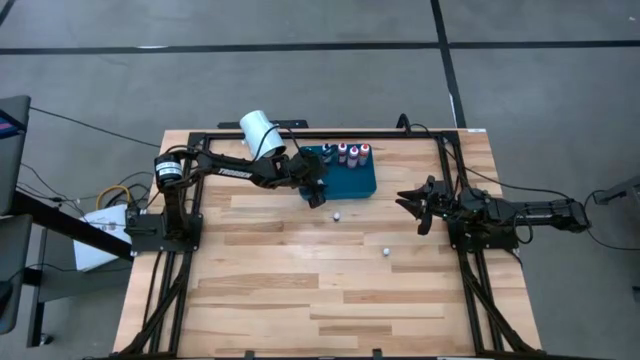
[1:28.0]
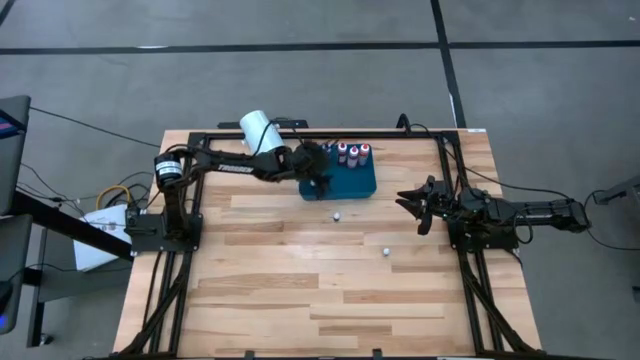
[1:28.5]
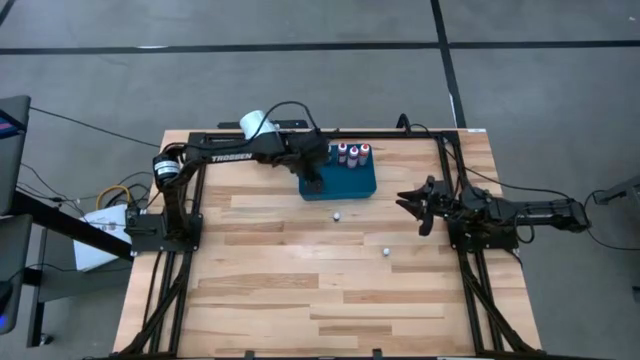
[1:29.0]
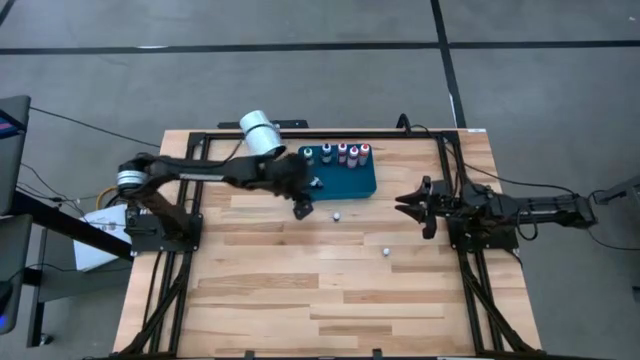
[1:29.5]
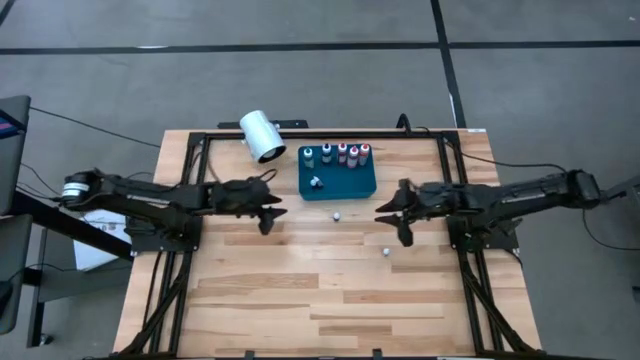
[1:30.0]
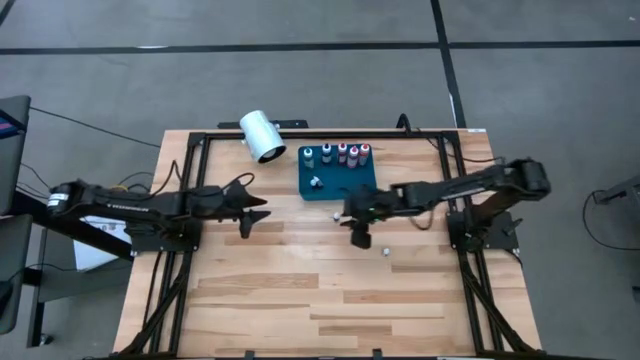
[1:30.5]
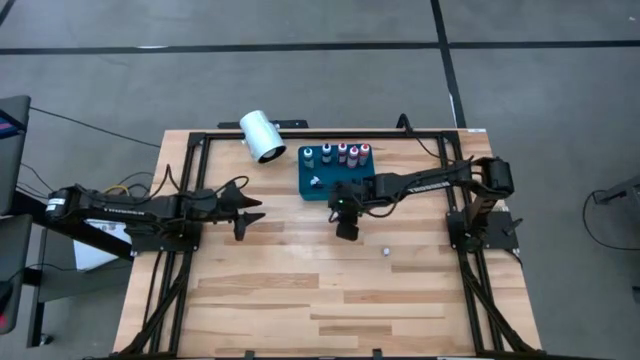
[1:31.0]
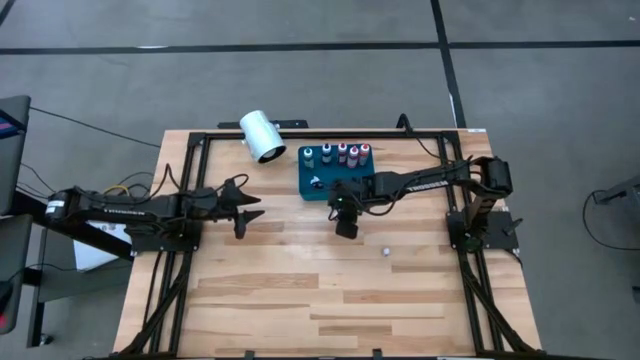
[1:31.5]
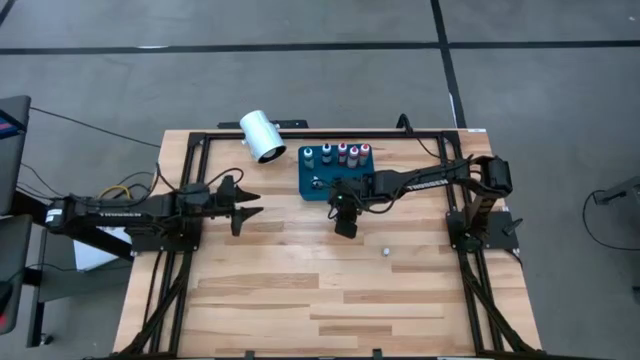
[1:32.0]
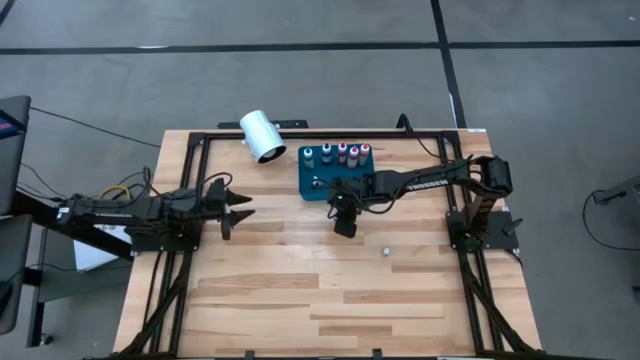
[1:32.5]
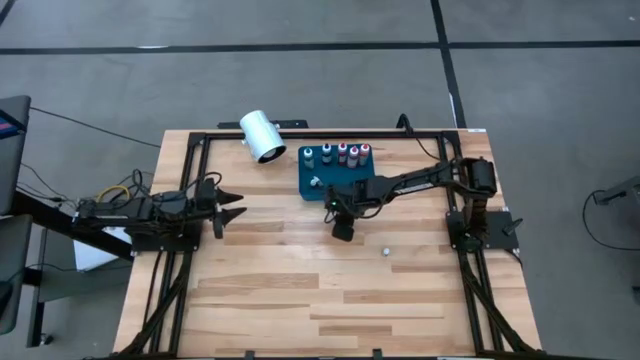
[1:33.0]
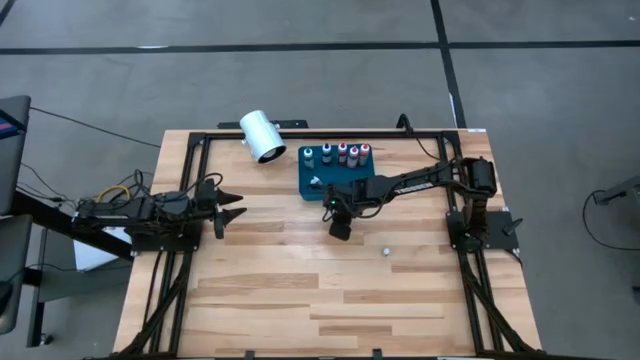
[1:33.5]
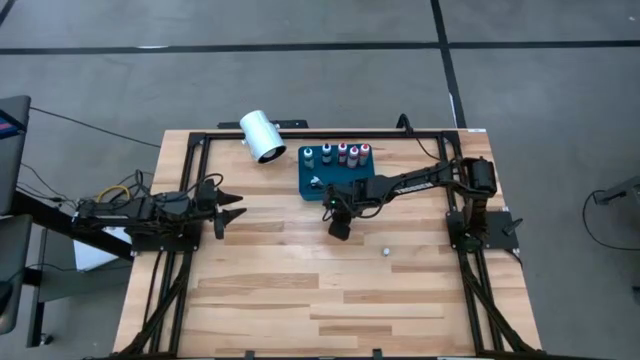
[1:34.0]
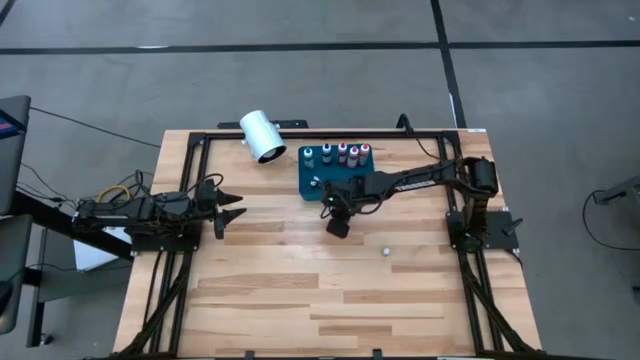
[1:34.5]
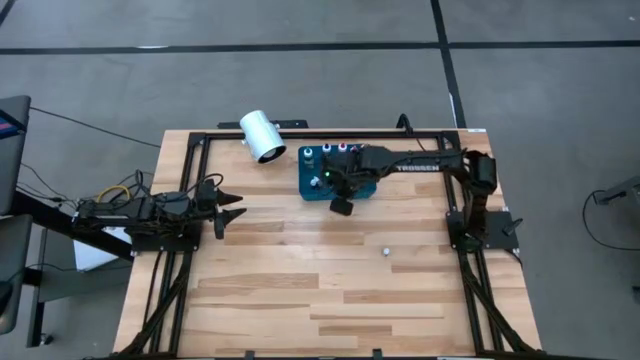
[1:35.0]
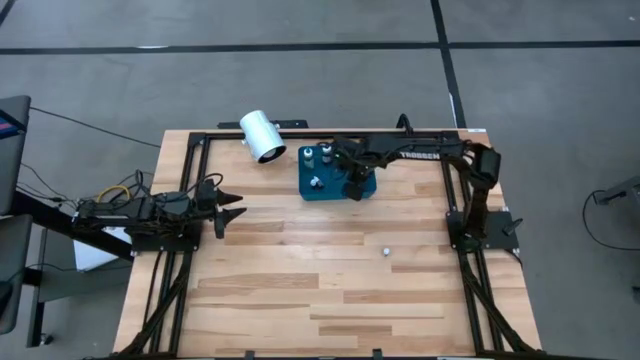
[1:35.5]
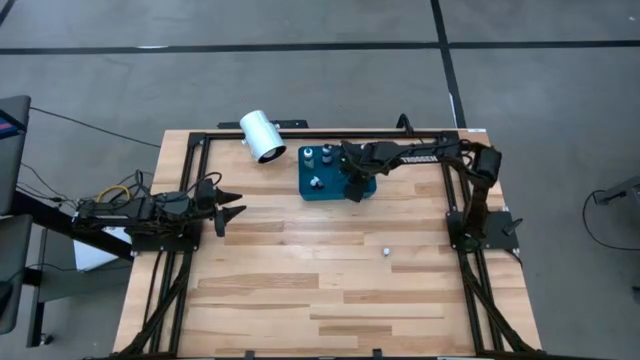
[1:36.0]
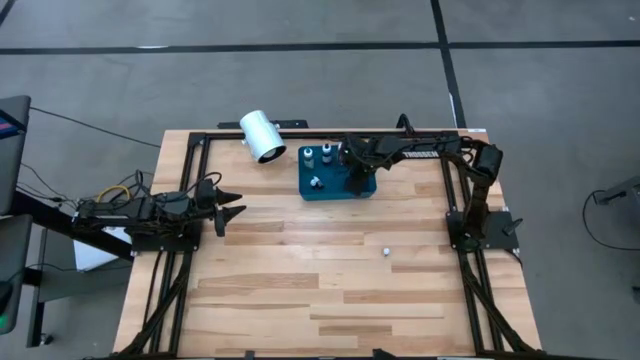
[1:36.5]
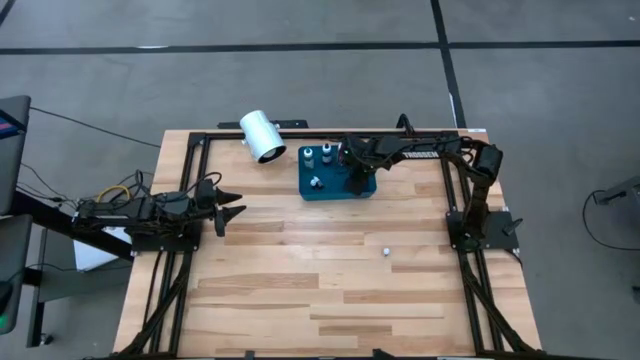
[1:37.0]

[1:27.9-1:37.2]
Task: Pick & Place food coloring
Put the small black food coloring bottle into the blue bin

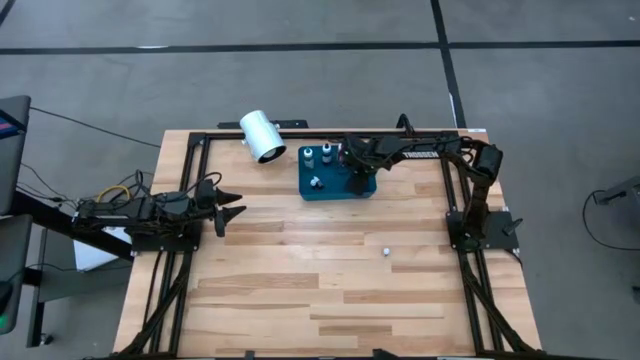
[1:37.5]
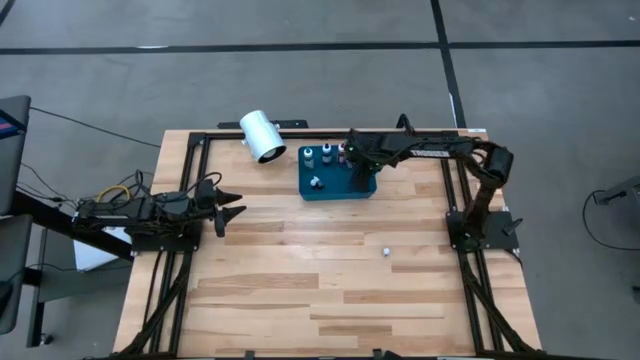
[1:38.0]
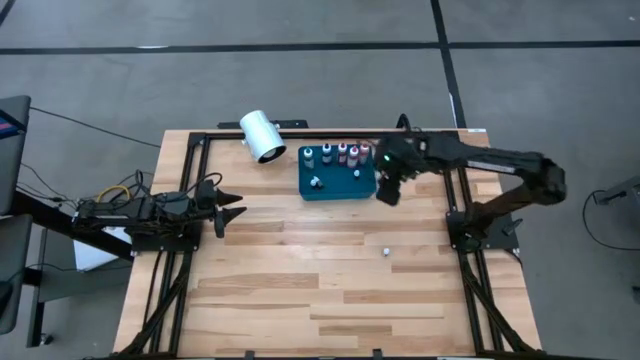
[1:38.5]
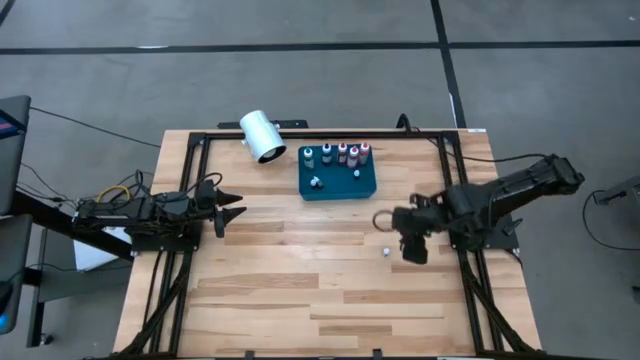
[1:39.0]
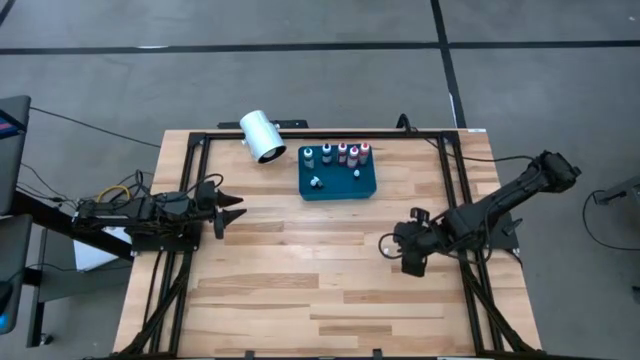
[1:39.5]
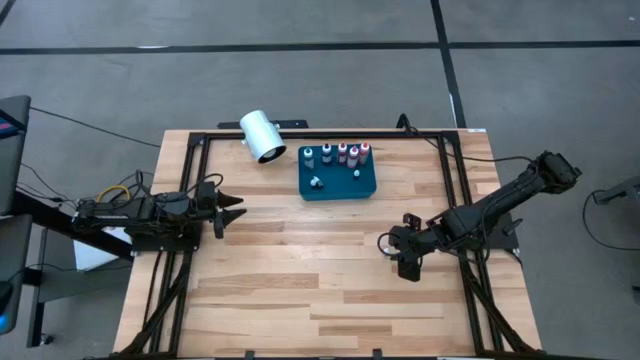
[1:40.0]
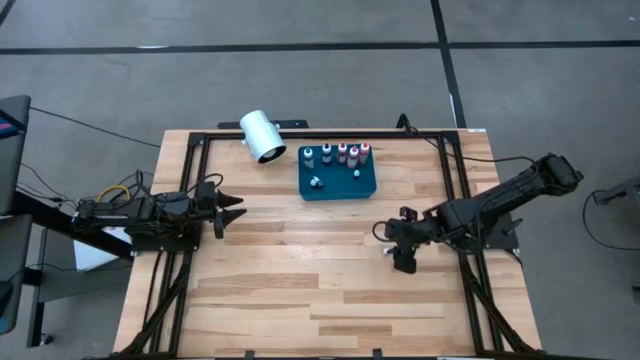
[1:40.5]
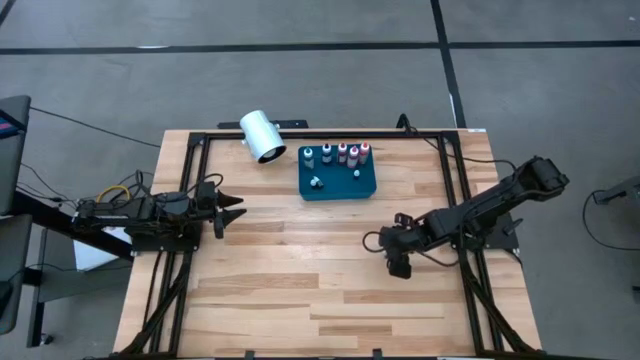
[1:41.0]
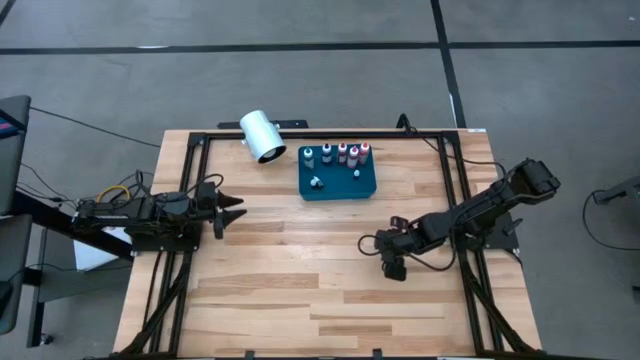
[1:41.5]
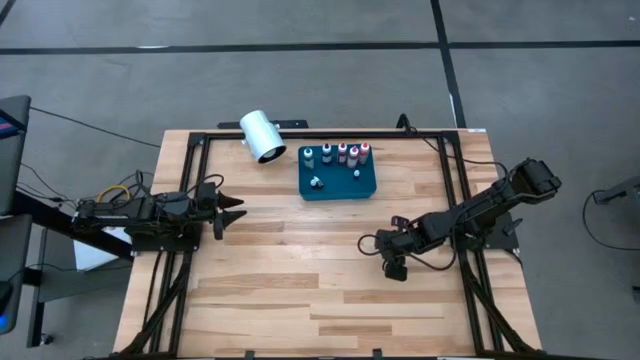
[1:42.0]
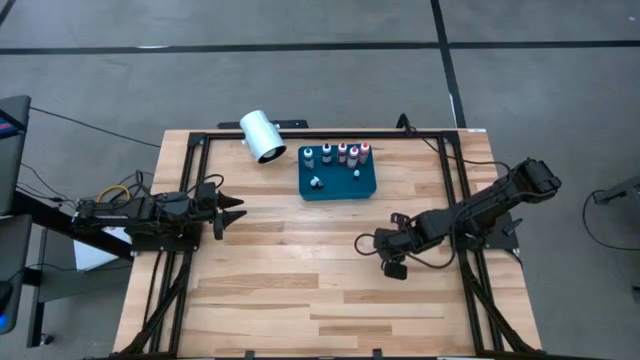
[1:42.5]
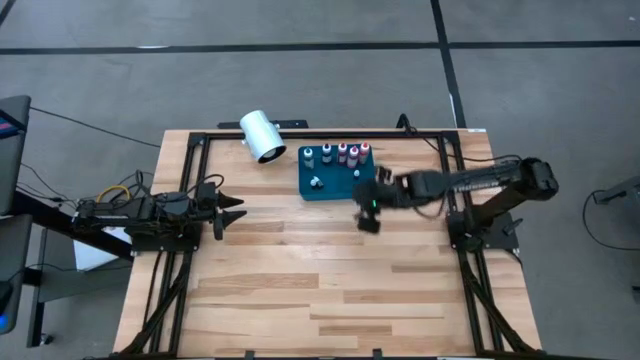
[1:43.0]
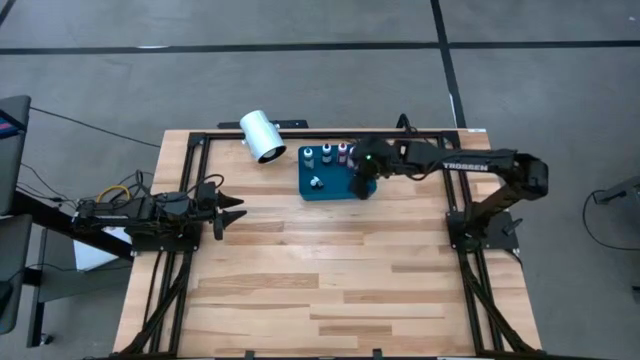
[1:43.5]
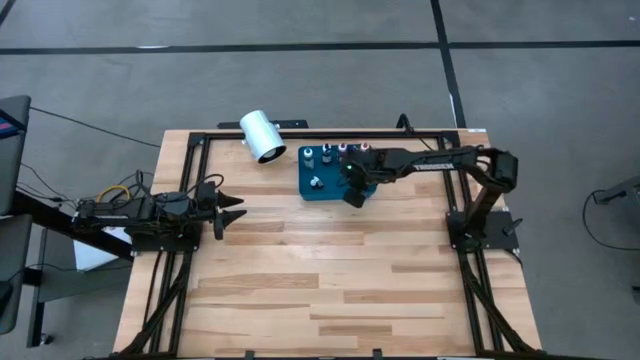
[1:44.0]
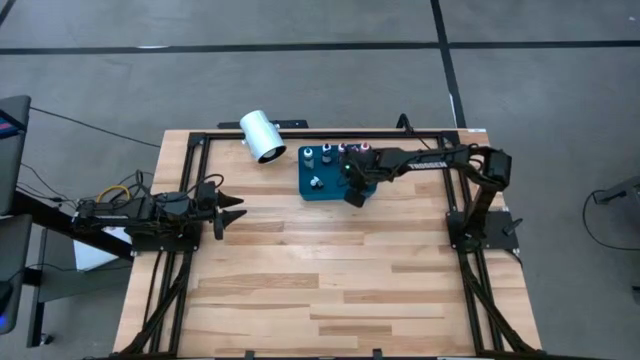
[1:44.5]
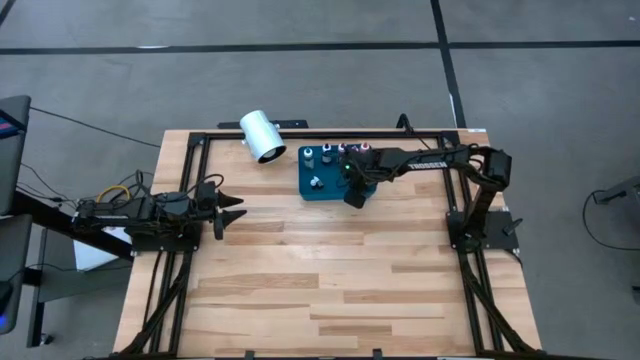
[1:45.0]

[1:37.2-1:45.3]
Put the small violet food coloring bottle into the blue bin

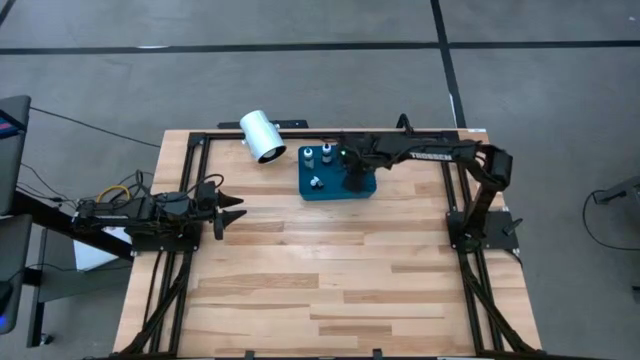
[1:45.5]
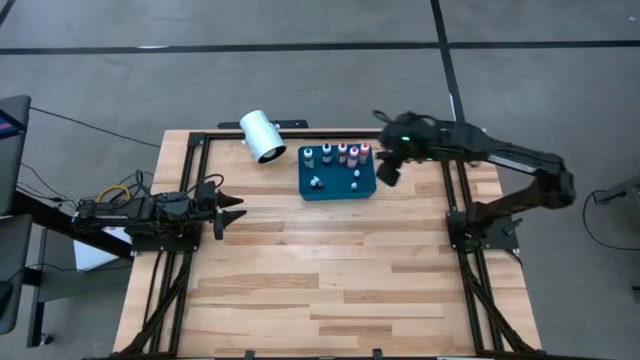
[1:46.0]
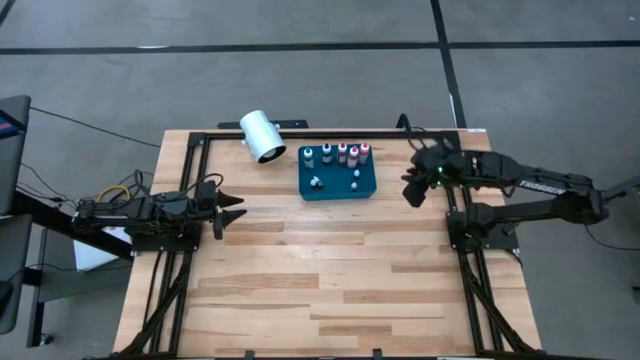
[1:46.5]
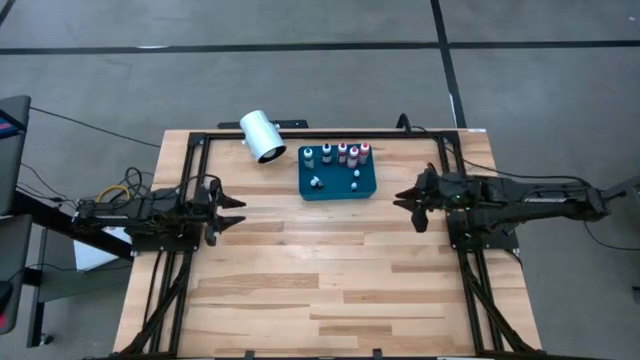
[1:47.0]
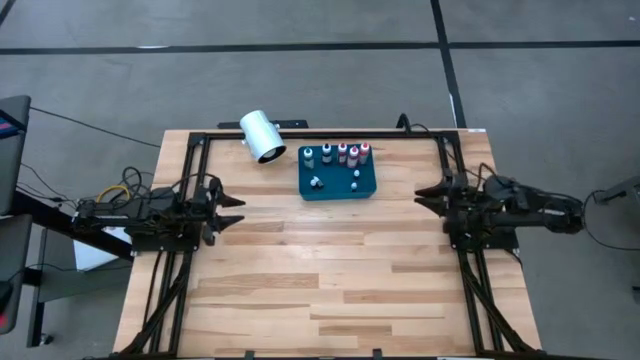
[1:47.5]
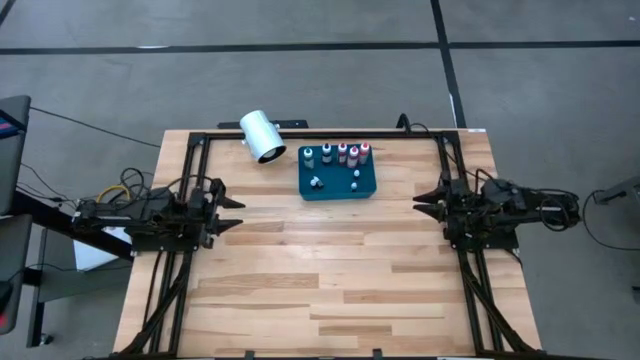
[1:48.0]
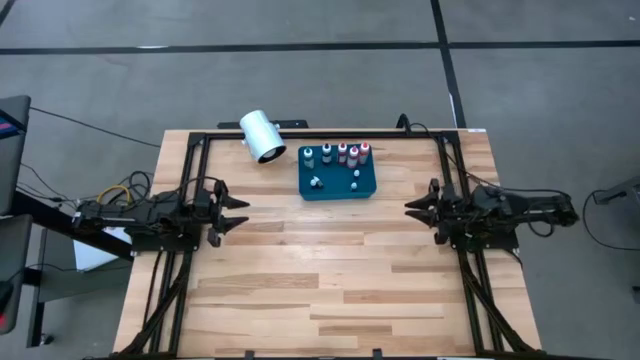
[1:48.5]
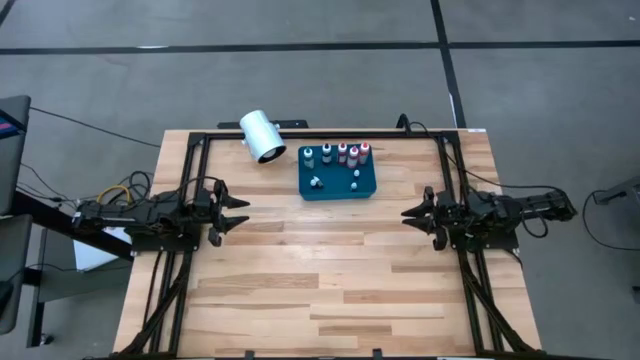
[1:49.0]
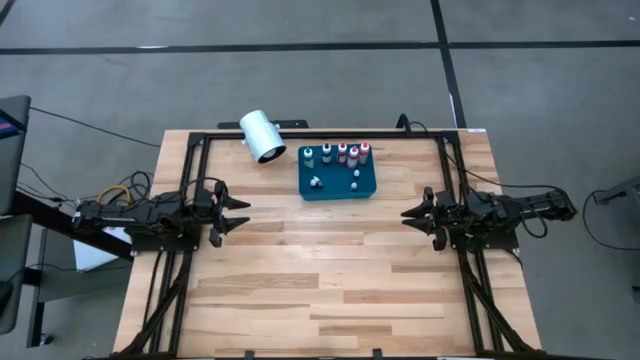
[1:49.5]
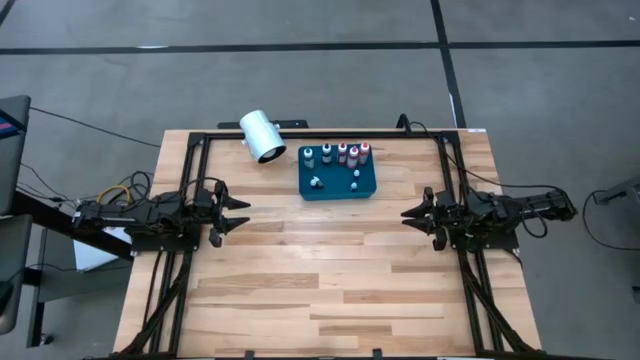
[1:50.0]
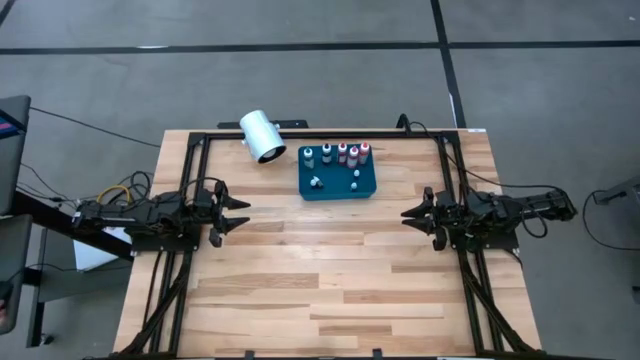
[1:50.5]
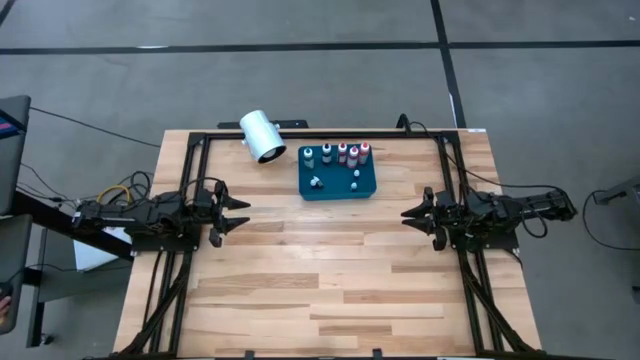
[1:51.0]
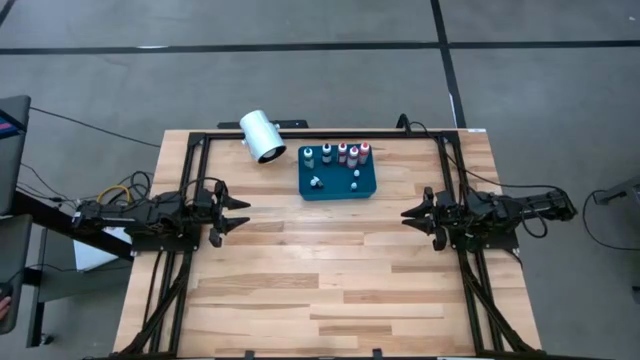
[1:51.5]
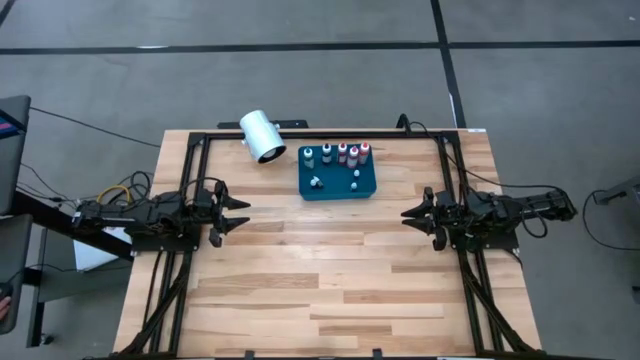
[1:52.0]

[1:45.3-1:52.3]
Return to Home Position
